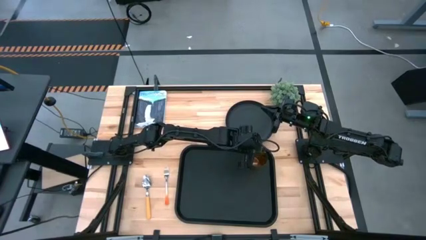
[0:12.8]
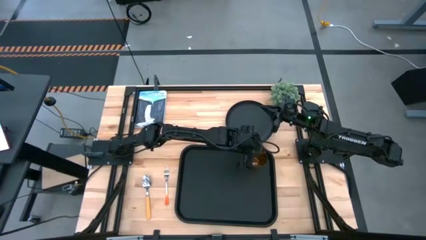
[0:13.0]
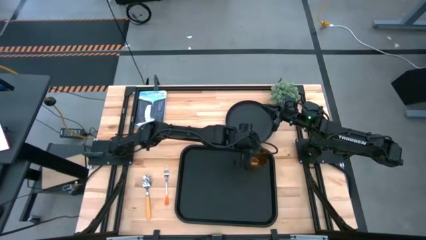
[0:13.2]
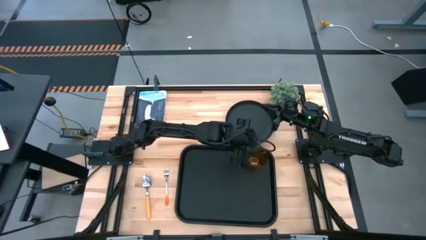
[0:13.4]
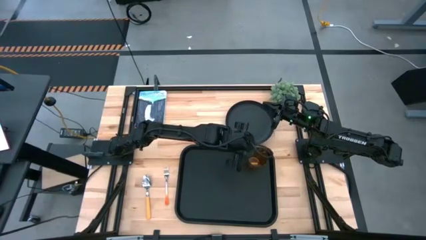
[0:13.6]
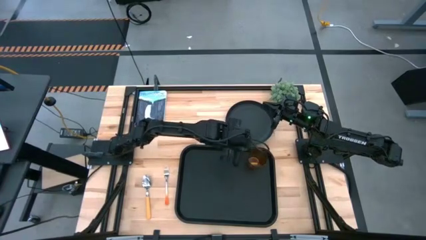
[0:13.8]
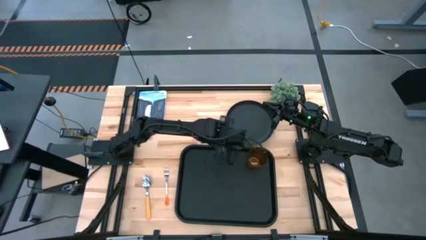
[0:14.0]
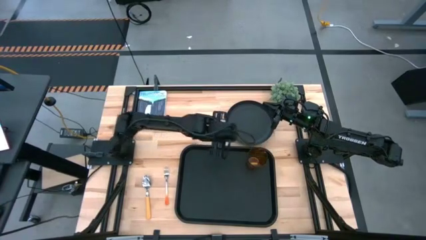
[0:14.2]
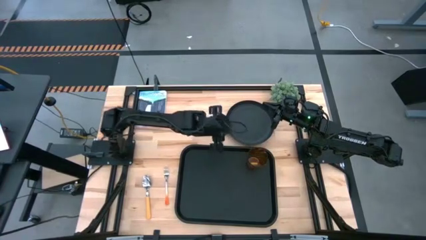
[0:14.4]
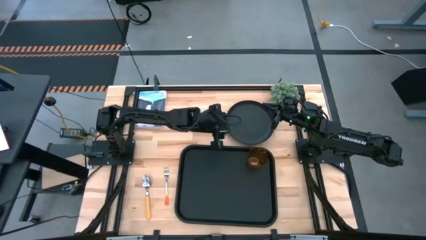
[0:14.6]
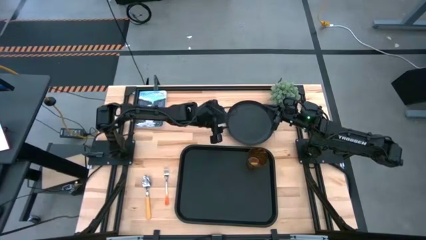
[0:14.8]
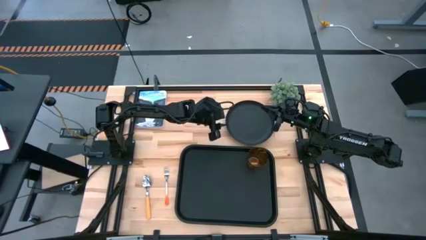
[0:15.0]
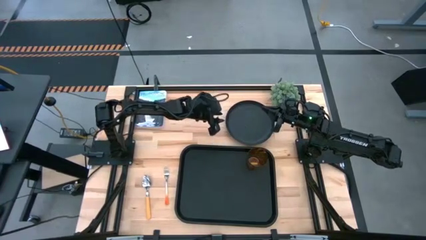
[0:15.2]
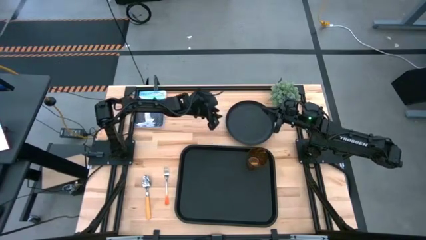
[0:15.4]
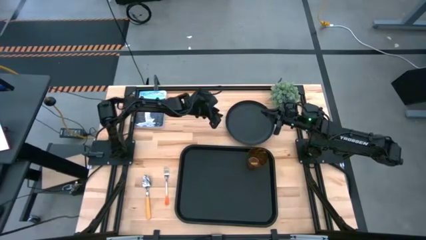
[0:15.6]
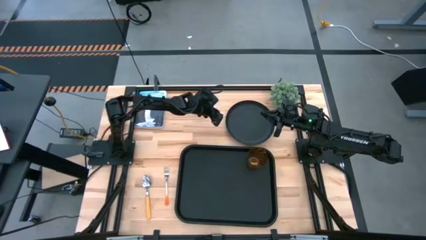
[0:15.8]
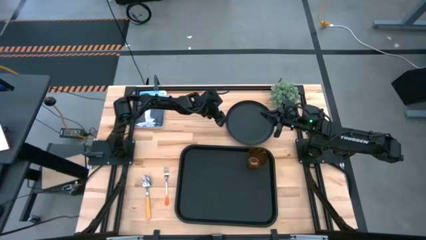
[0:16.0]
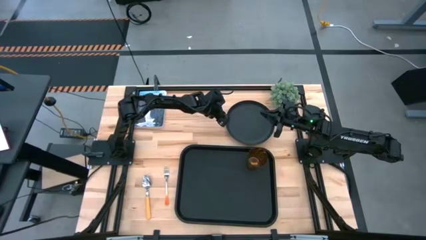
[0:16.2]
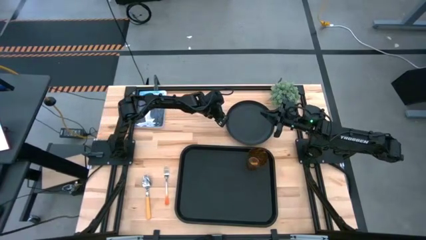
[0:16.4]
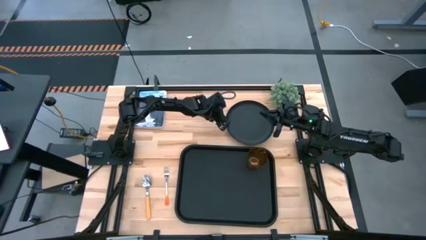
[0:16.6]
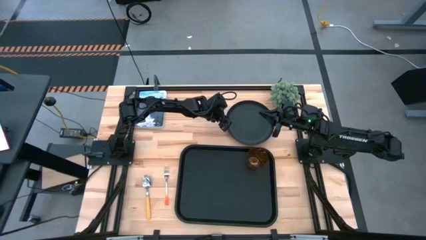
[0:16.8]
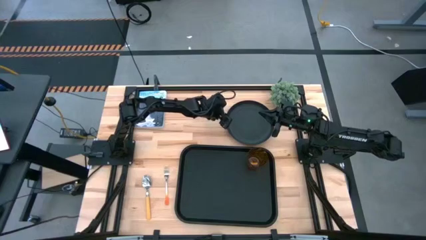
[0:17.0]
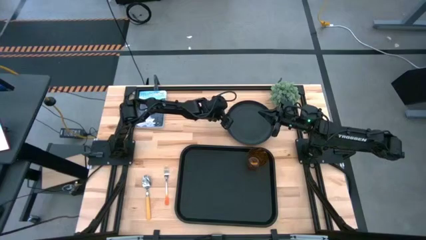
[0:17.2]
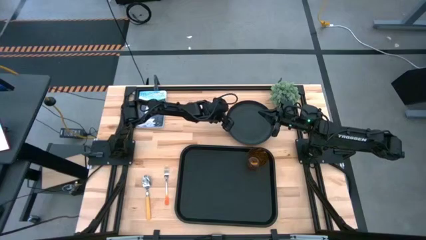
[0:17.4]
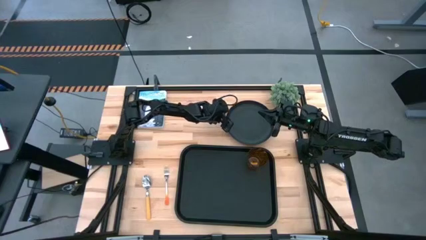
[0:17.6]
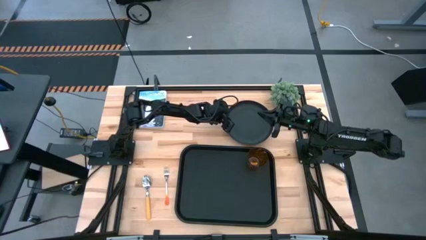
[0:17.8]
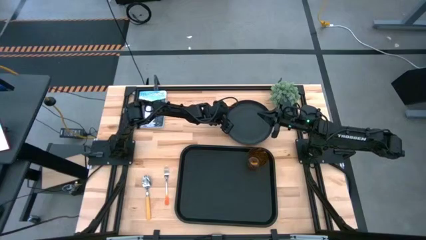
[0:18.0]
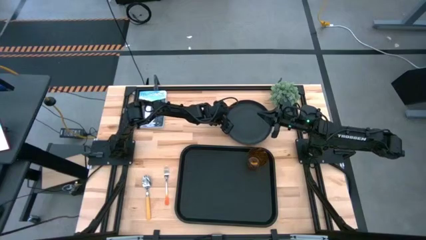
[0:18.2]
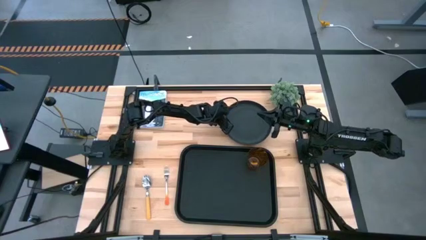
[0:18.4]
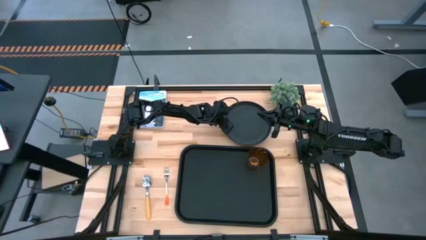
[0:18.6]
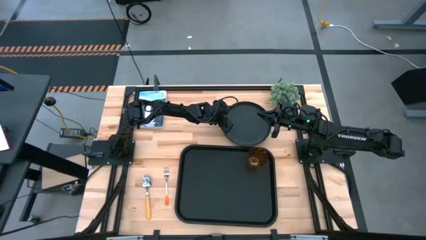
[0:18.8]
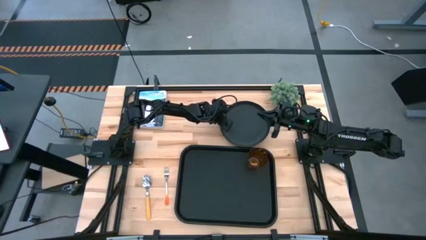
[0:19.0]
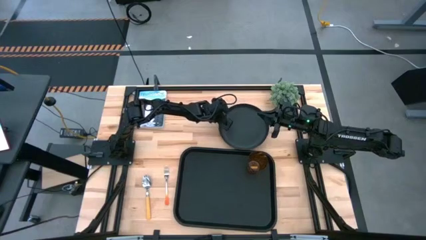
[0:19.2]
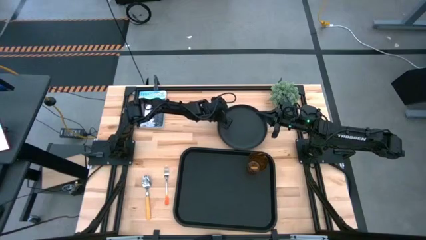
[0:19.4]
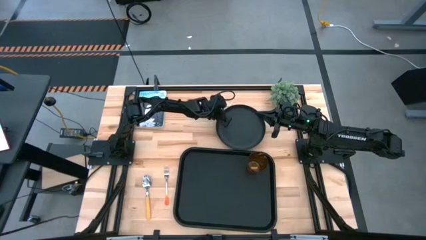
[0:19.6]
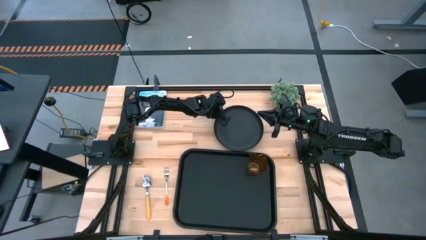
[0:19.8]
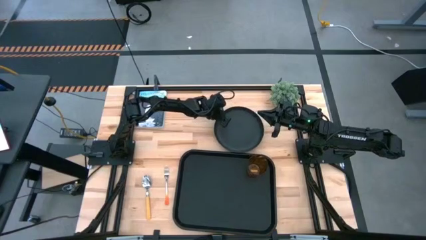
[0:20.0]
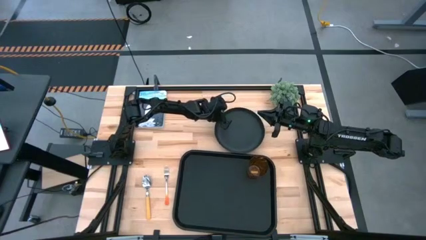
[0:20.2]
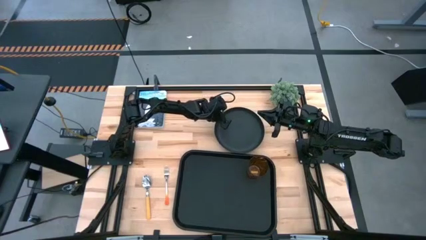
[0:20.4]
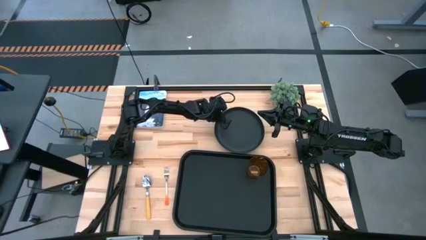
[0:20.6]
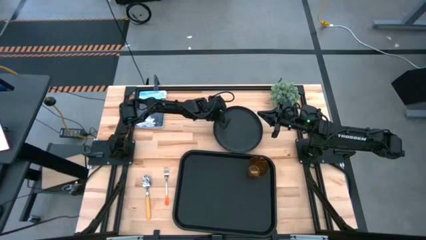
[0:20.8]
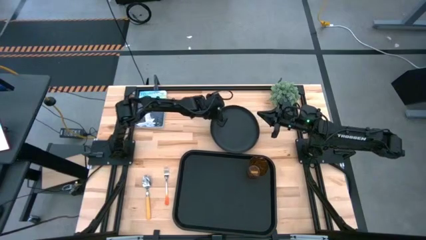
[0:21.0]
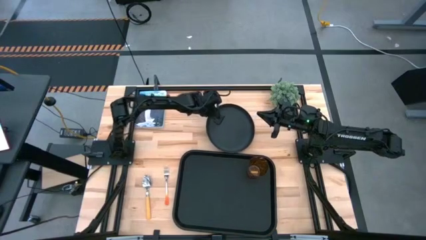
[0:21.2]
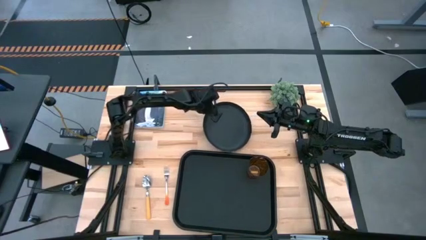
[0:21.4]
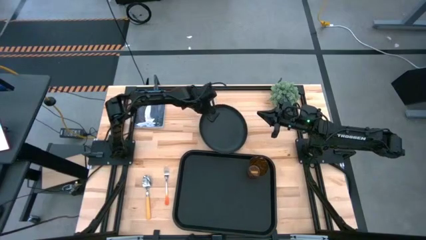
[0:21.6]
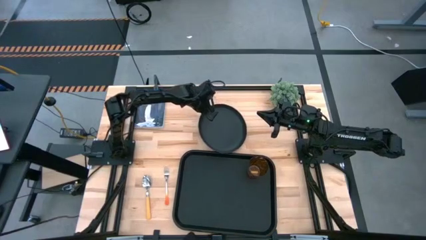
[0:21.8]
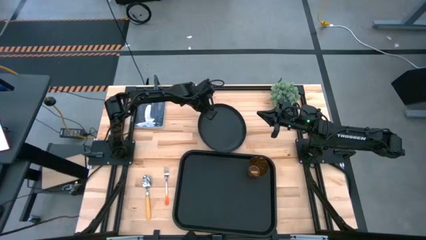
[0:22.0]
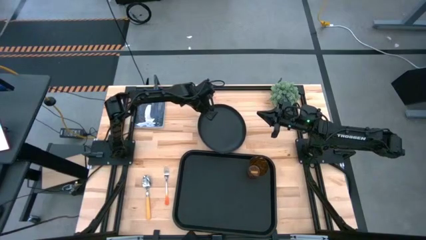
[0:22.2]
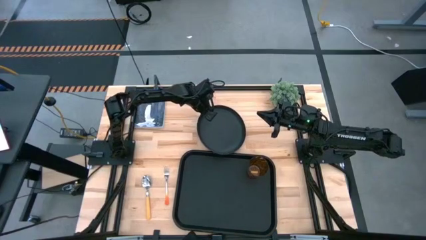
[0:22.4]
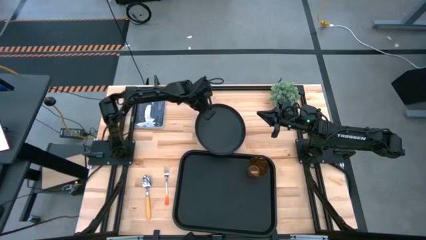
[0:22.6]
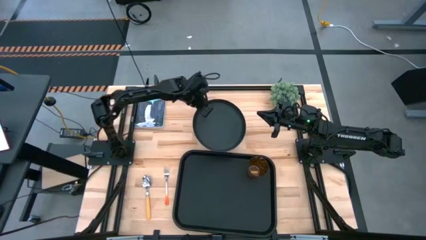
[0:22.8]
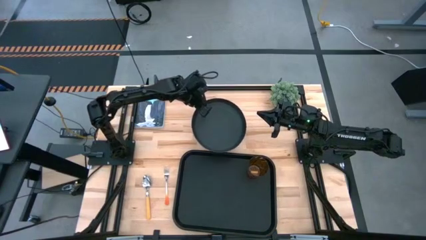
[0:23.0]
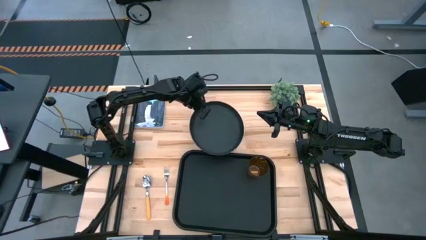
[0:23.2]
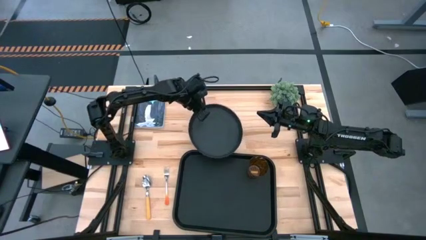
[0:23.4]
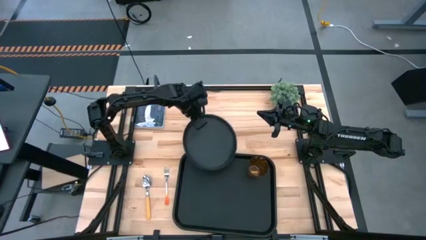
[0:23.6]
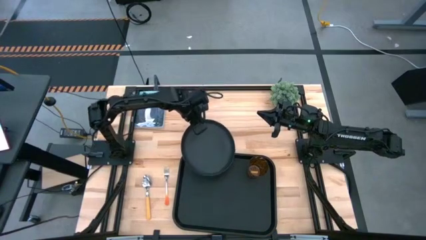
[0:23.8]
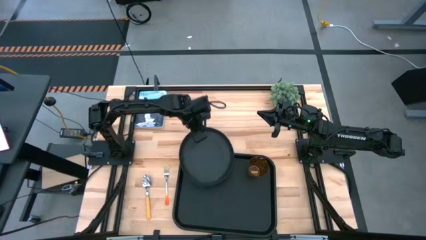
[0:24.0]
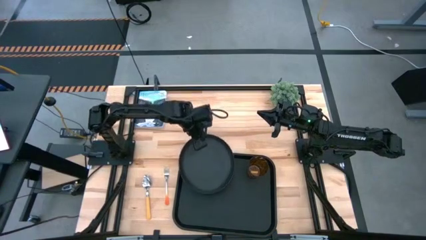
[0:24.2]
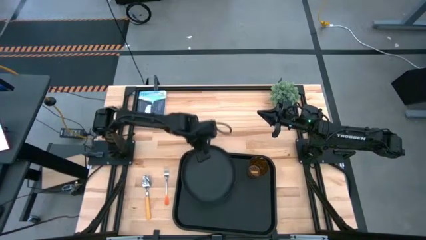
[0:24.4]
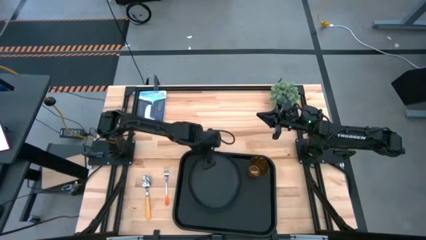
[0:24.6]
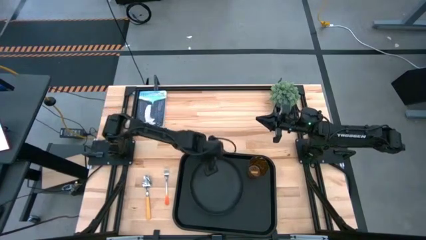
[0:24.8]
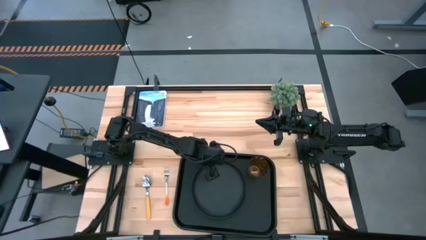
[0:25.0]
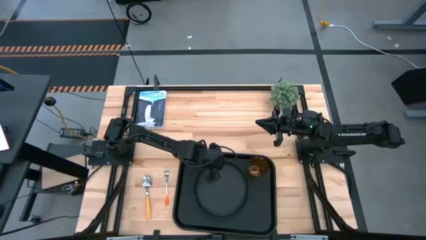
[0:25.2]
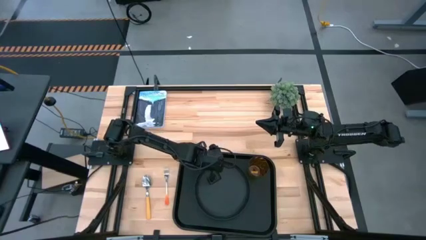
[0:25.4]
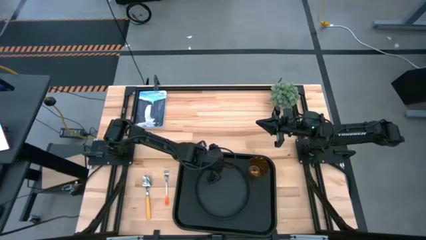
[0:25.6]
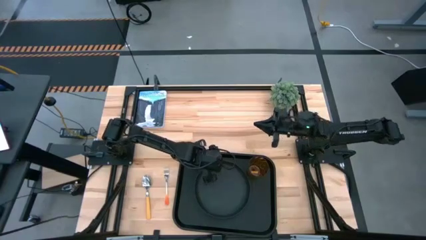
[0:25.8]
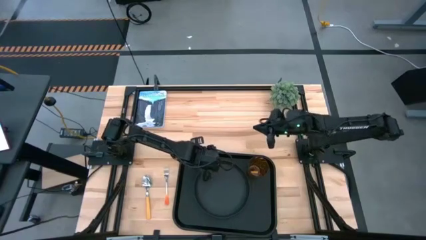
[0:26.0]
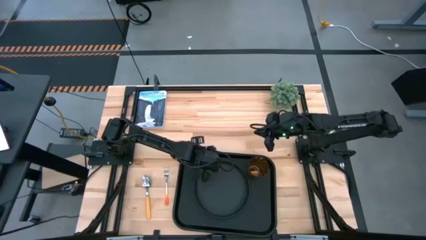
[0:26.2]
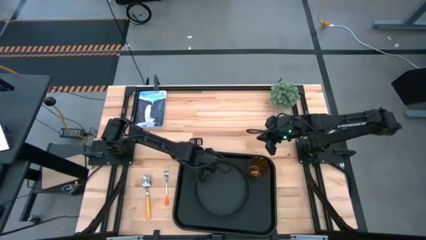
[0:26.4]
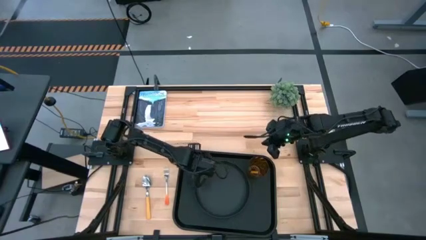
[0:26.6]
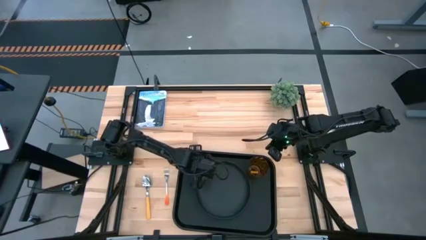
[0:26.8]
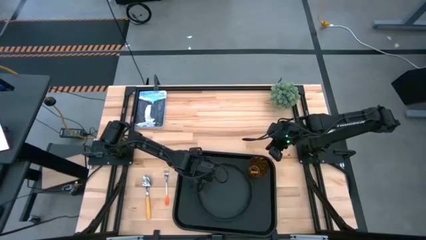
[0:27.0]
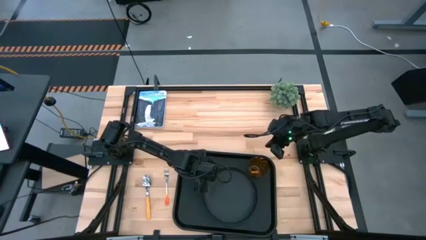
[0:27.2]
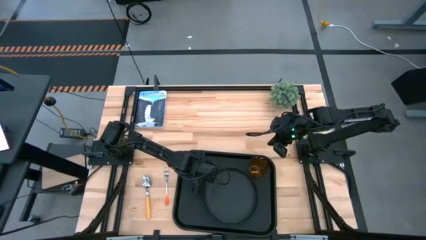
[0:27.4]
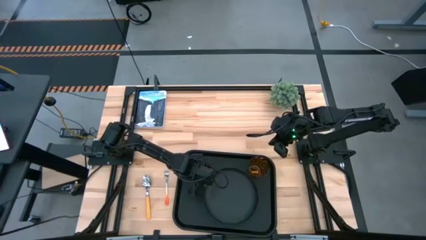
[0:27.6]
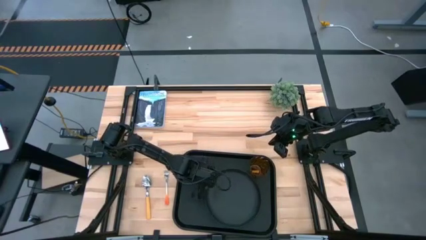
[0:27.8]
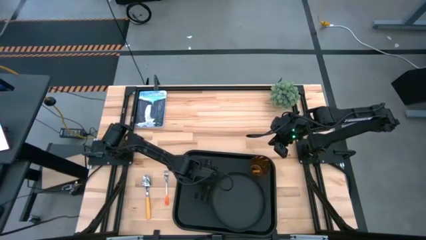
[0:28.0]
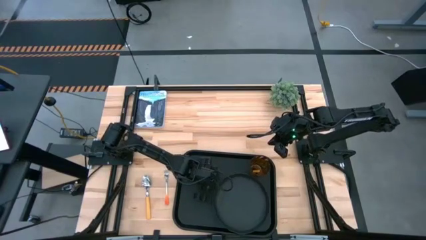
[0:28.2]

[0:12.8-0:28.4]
Task: Pick and place plate/cup/fork/spoon on tray
Put the black plate on the black tray at the bottom of the brown cup
